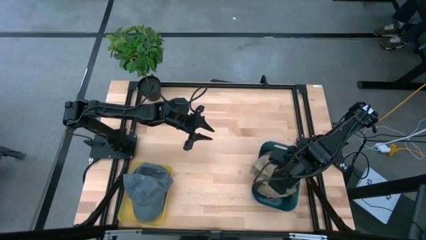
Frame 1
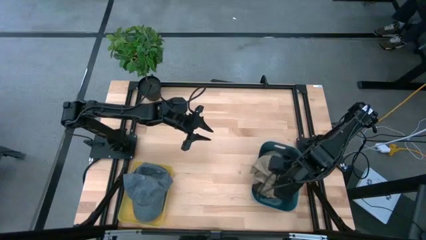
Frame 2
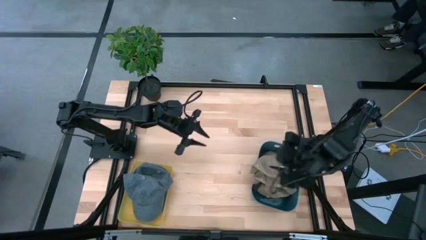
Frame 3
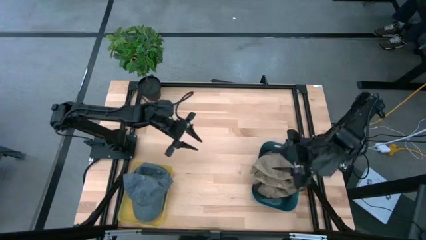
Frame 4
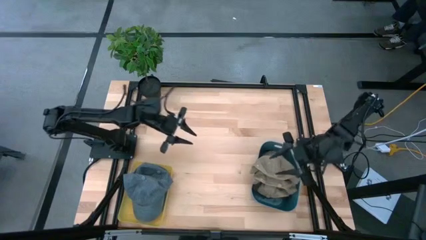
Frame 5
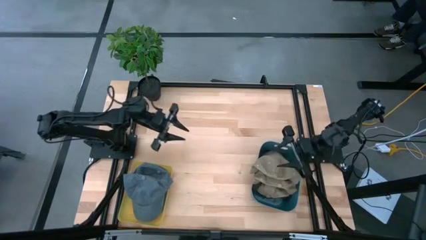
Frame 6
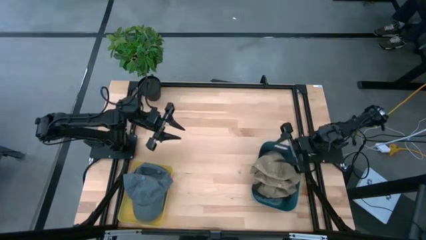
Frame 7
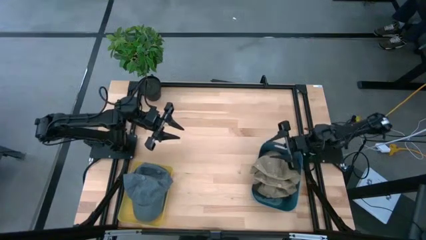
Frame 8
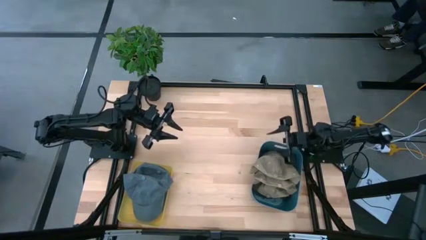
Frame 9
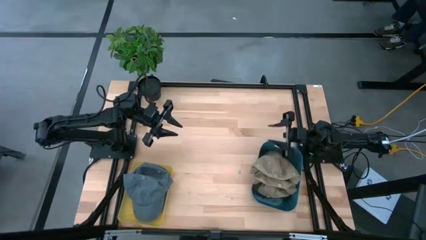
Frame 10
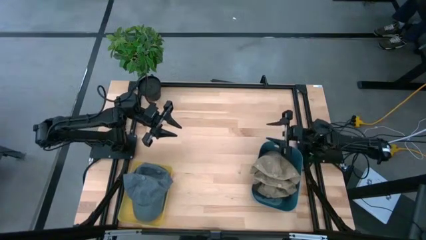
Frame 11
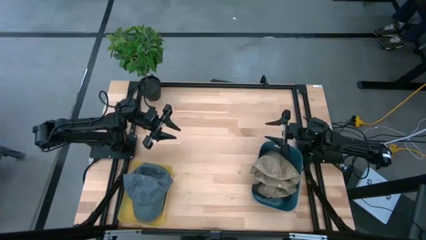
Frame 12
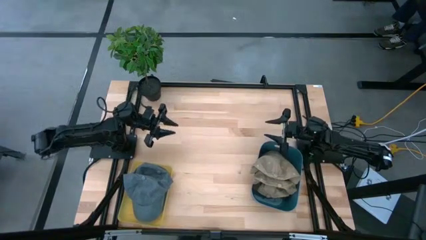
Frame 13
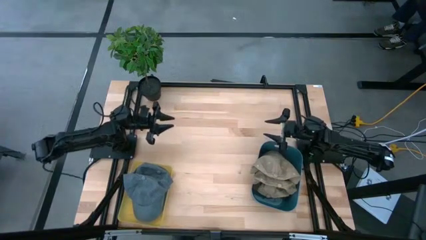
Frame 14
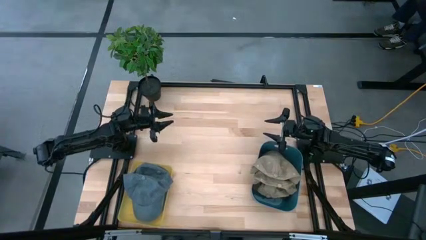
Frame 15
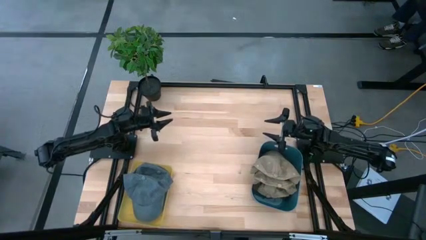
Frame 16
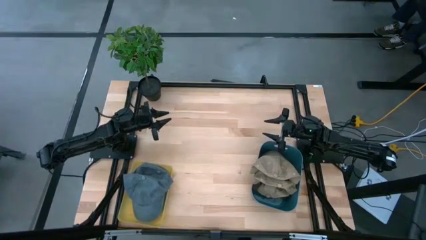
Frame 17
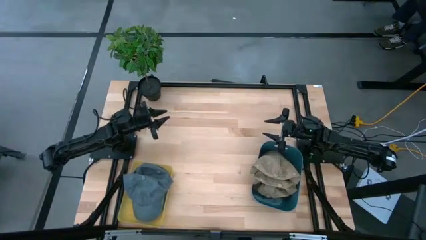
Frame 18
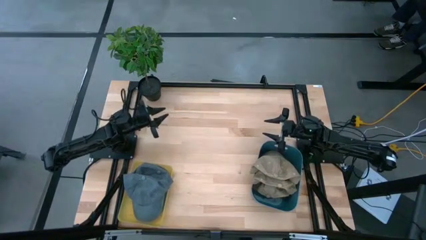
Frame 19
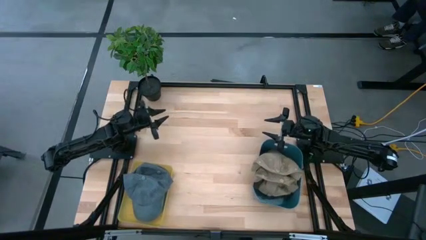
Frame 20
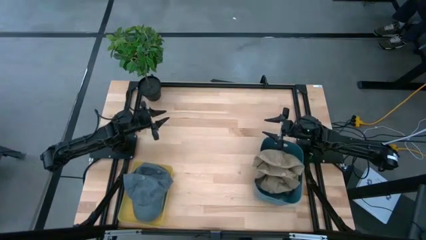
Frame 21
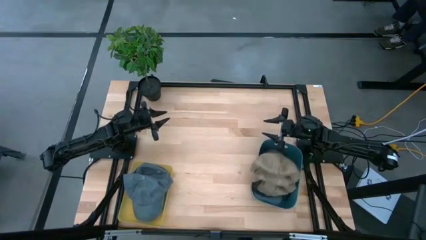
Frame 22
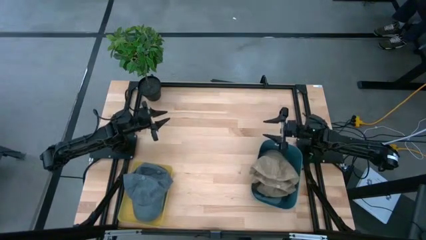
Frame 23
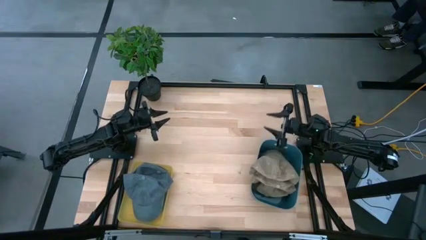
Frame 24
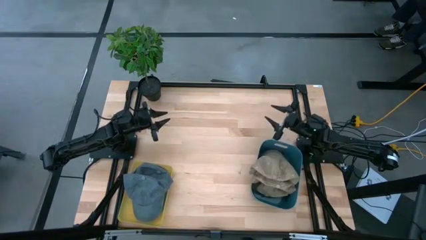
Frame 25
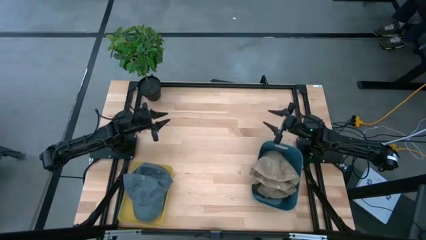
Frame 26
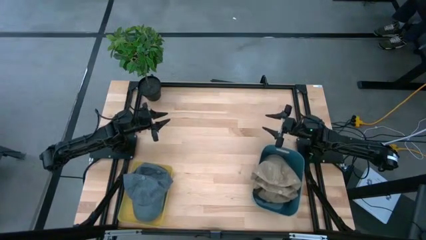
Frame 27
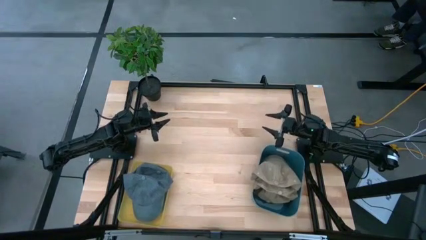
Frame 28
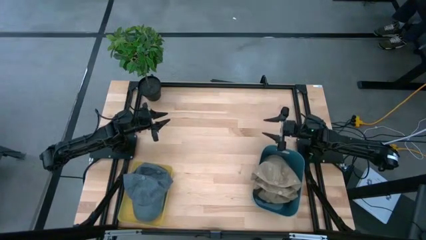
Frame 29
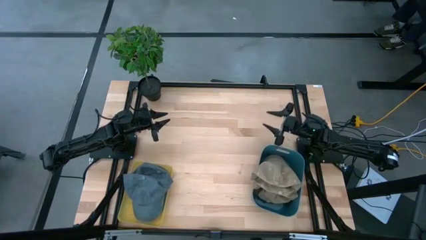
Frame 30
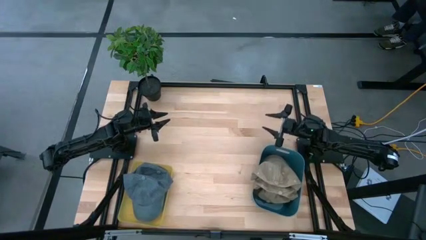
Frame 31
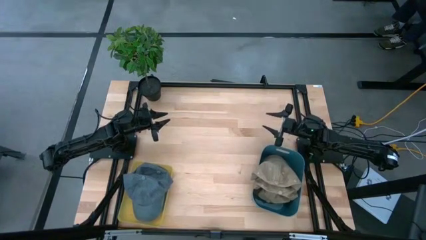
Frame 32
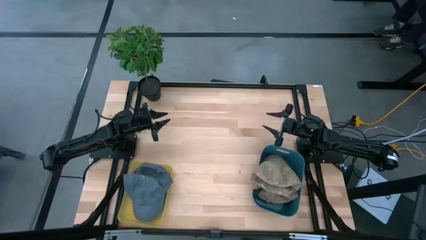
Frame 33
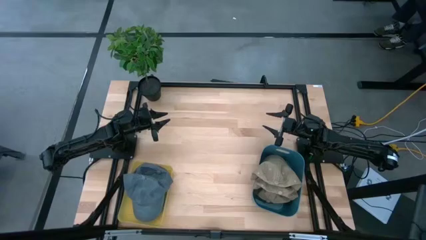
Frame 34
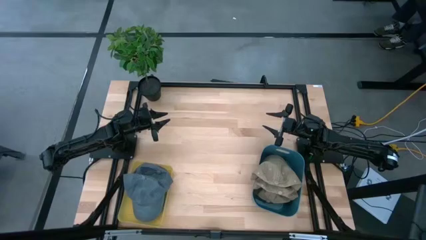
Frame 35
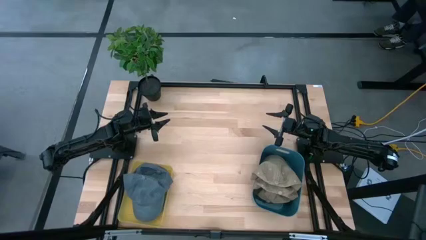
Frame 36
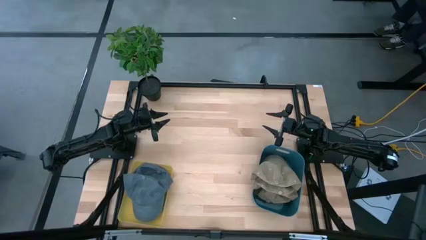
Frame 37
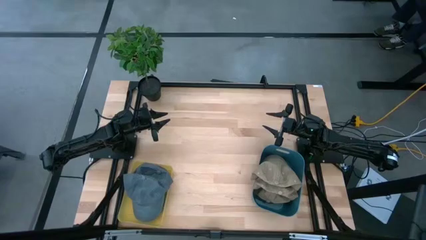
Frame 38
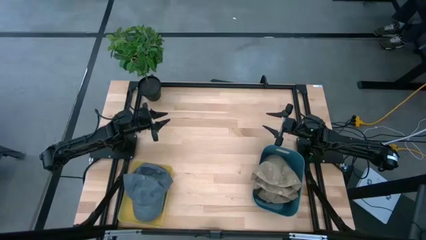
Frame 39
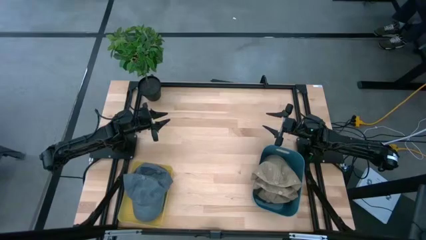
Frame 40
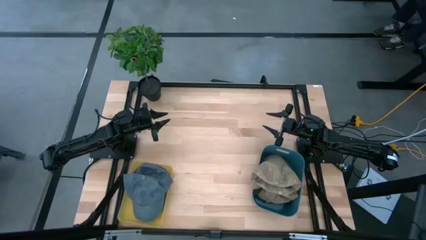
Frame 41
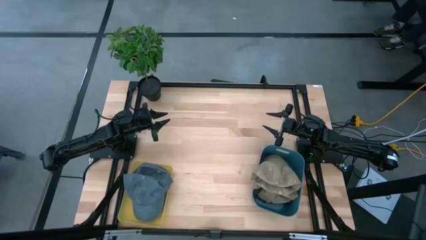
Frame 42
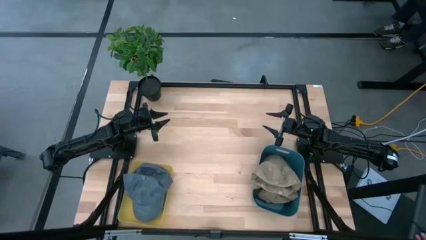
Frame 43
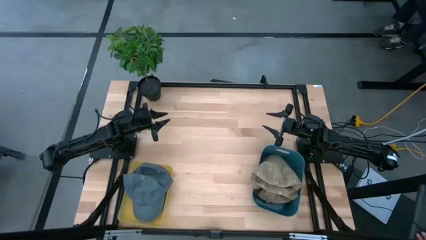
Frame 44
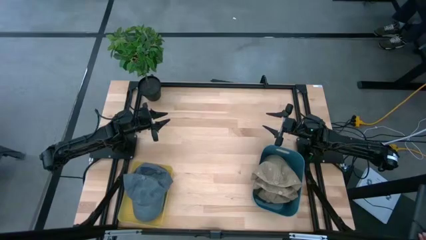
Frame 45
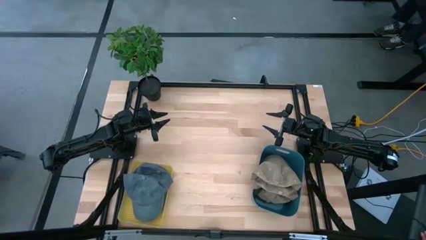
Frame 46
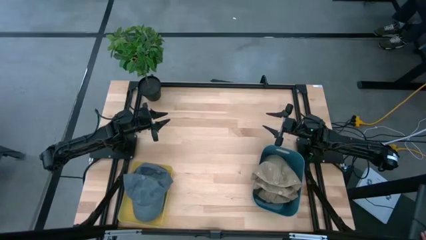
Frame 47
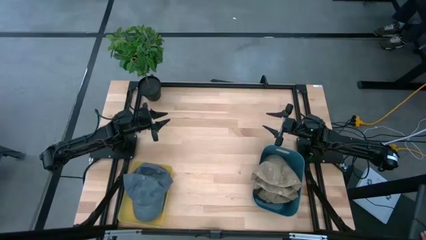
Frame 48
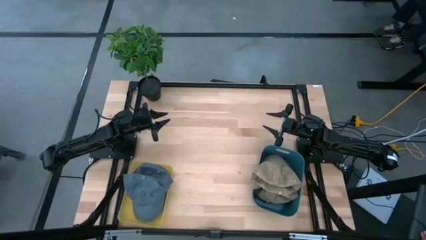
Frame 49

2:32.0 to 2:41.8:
Task: Pick & Place hat
Return to Home Position

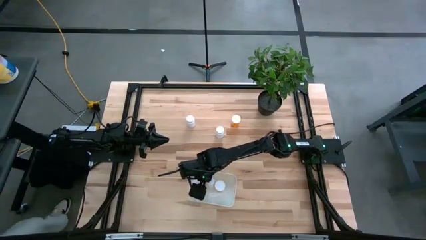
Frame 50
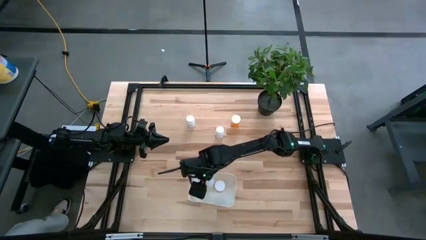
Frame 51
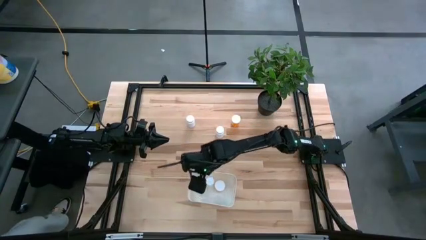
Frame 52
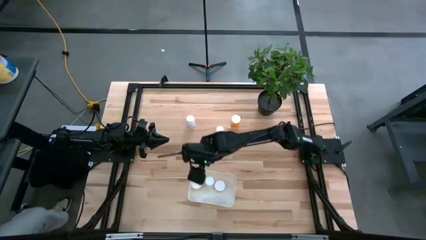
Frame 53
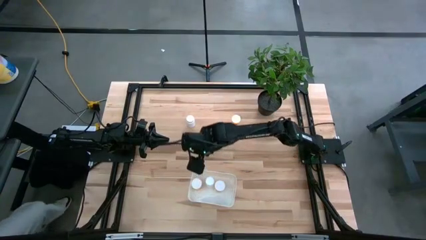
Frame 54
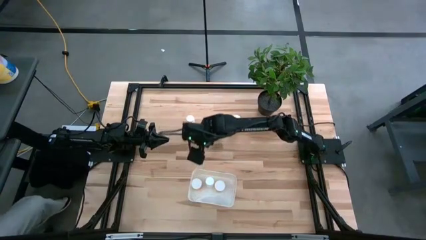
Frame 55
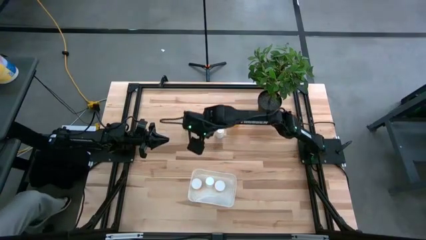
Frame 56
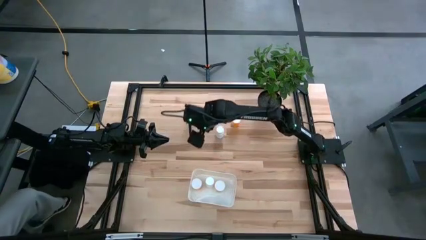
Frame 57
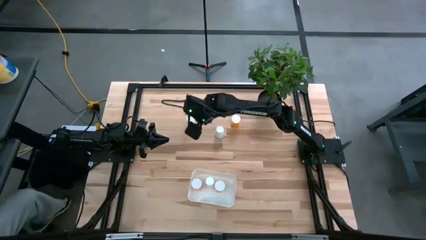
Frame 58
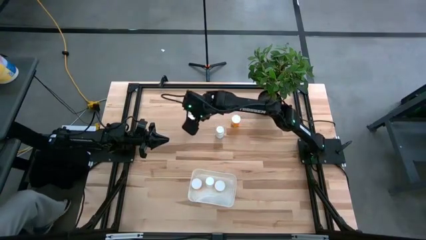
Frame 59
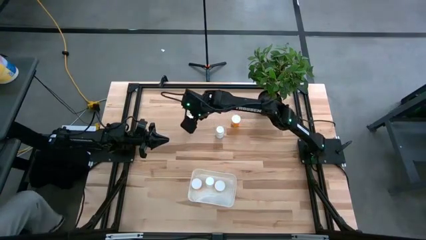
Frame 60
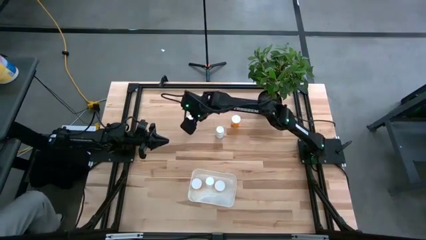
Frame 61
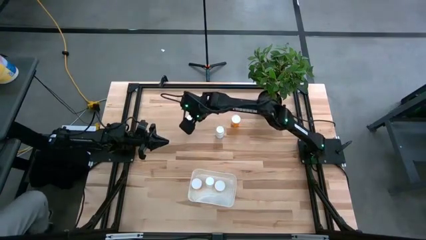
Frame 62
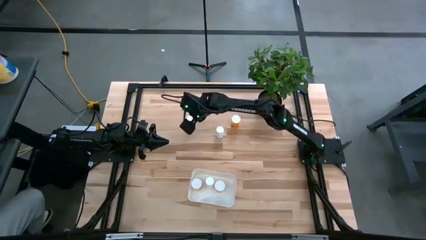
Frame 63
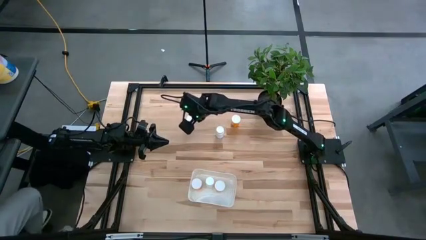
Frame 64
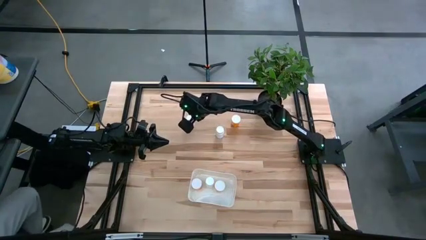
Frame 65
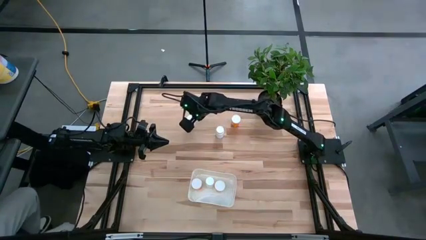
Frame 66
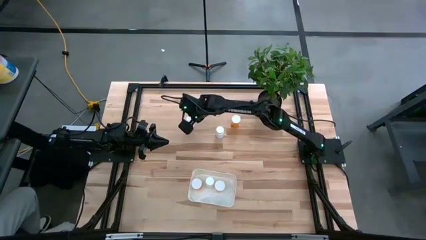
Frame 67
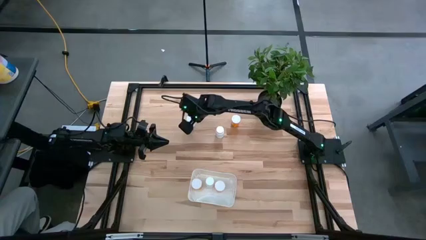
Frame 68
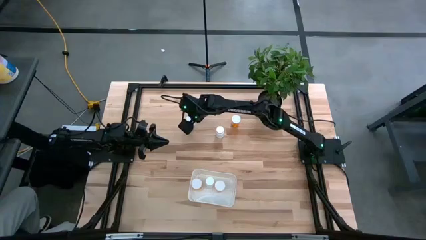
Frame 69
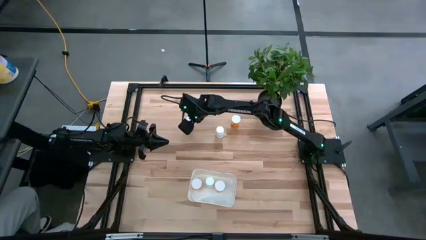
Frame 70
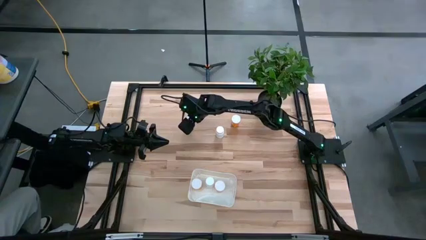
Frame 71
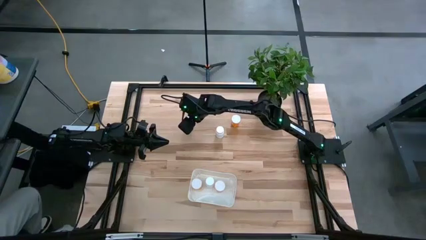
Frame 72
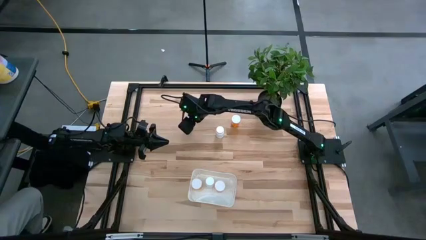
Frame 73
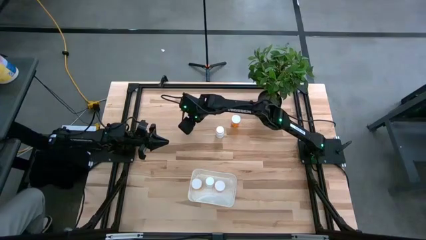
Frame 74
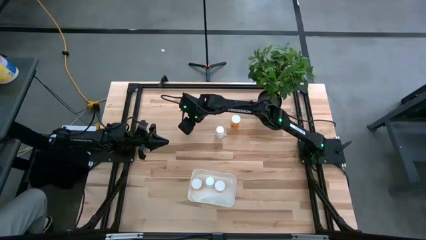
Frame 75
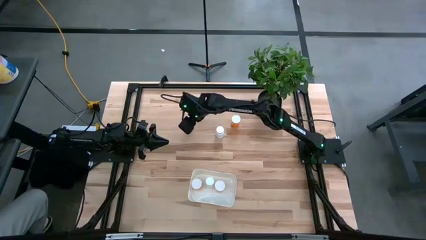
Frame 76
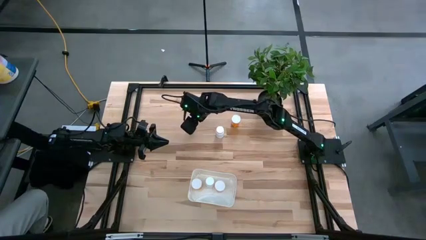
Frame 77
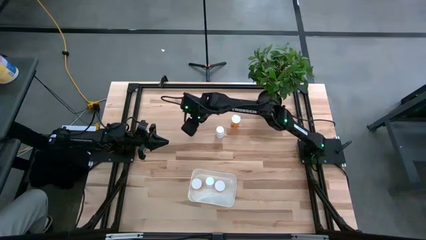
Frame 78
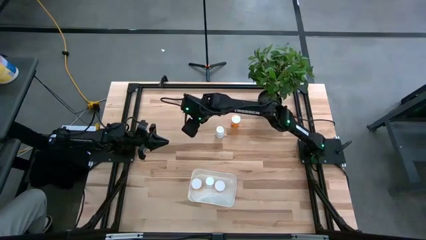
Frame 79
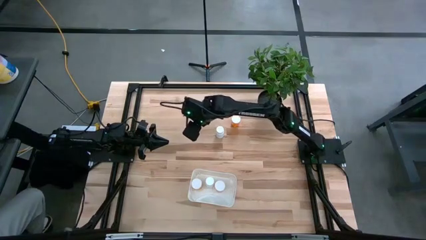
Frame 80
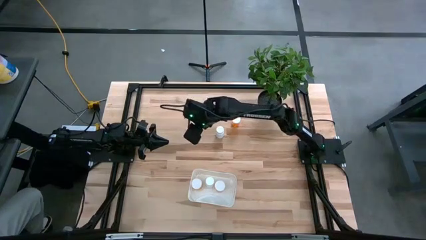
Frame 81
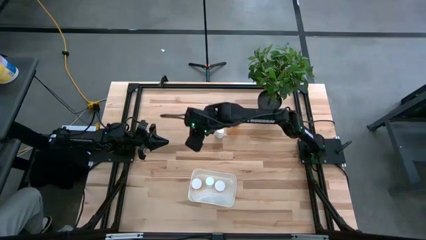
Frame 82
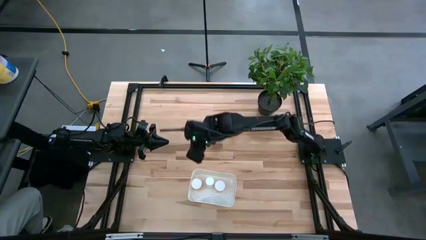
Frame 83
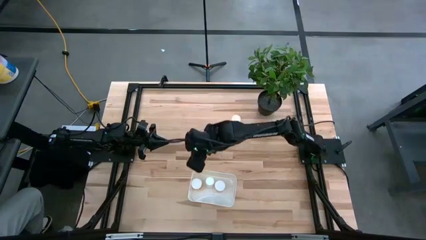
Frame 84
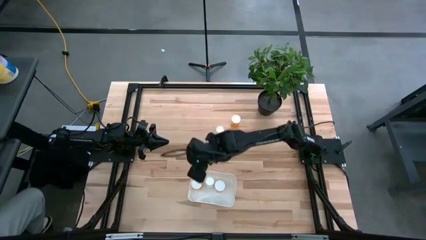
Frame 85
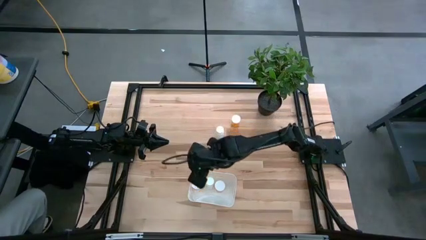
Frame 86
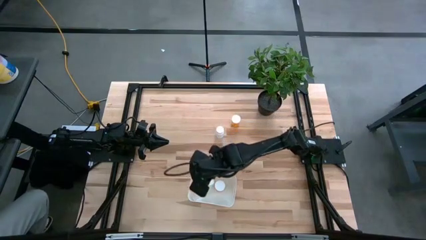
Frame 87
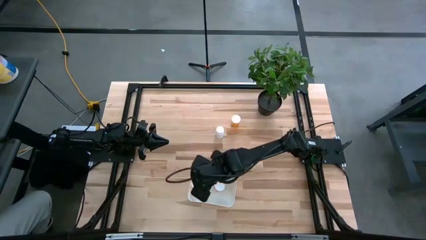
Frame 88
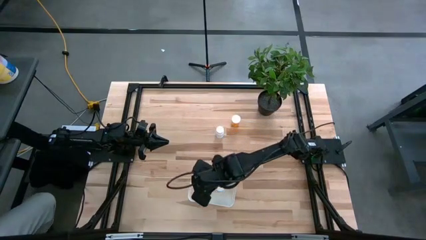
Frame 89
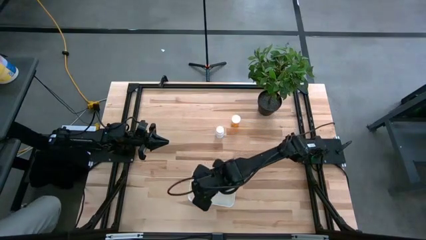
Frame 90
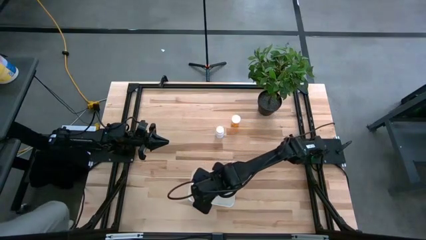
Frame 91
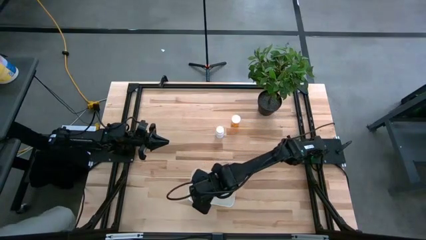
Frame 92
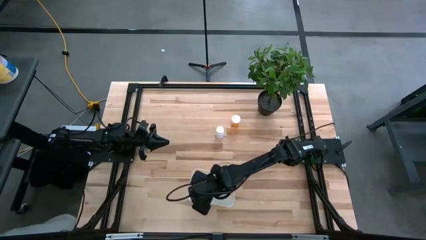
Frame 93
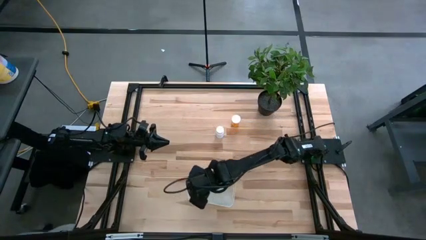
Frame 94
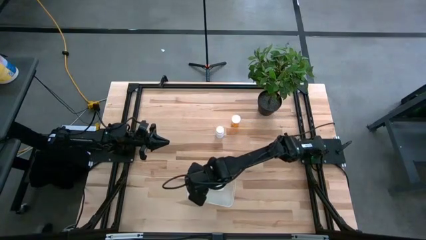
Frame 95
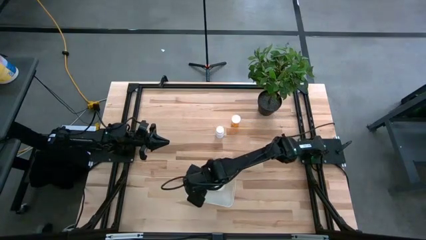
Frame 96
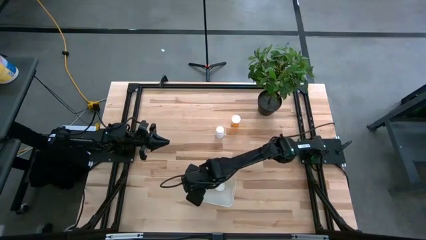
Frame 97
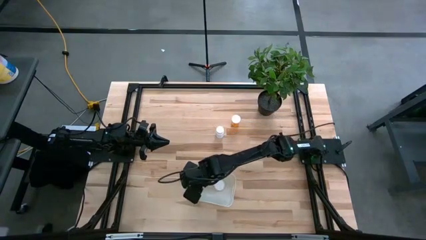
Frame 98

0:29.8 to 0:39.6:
Task: Pick and place pill bottles into a basket
Put the left white medicine bottle into the container
